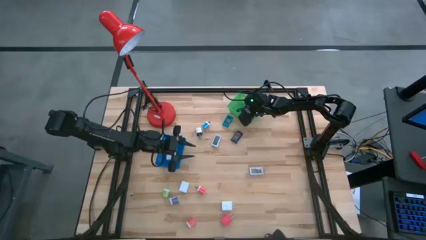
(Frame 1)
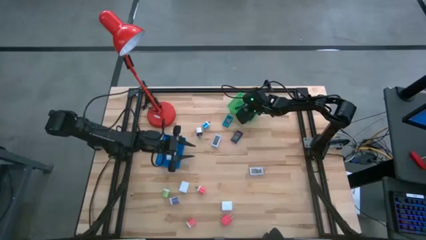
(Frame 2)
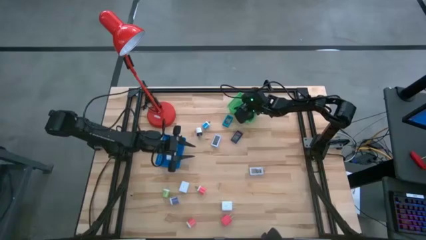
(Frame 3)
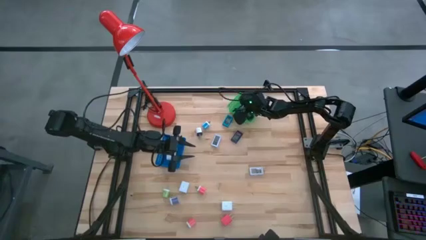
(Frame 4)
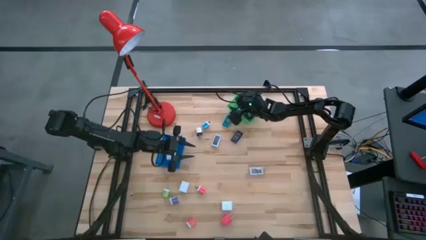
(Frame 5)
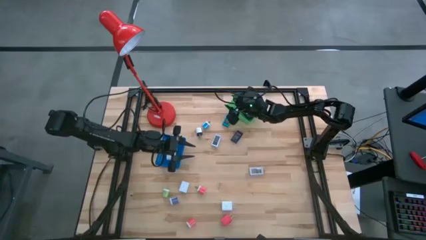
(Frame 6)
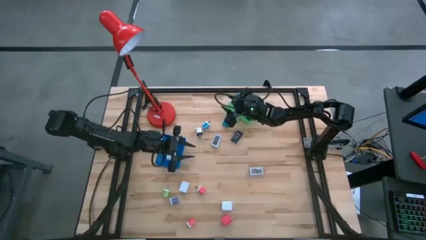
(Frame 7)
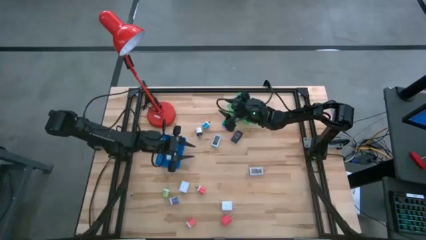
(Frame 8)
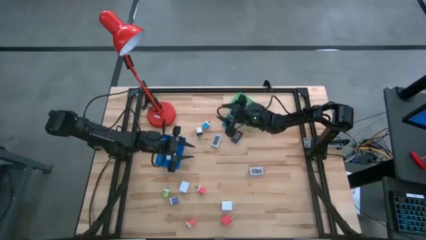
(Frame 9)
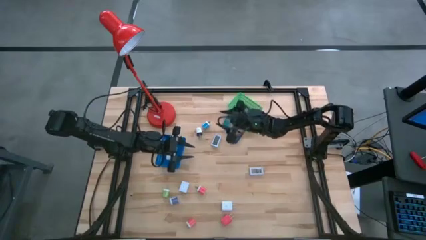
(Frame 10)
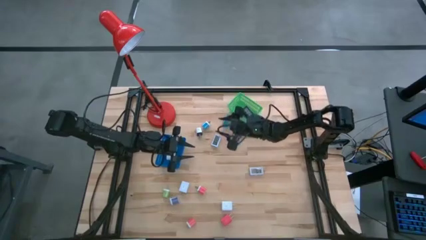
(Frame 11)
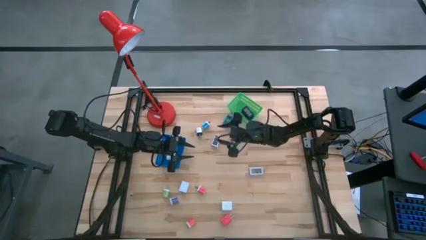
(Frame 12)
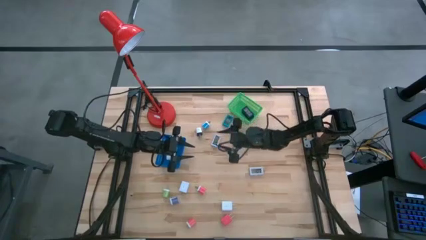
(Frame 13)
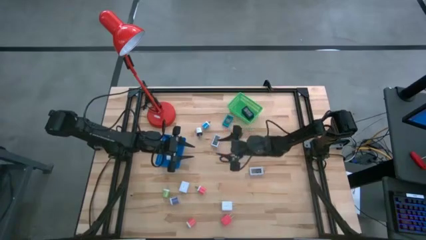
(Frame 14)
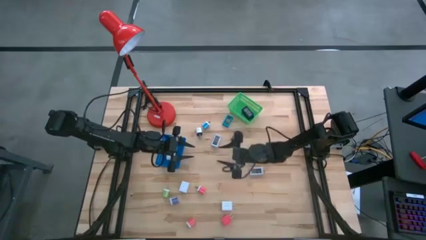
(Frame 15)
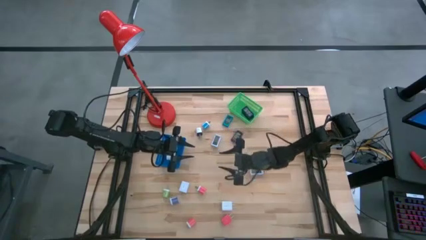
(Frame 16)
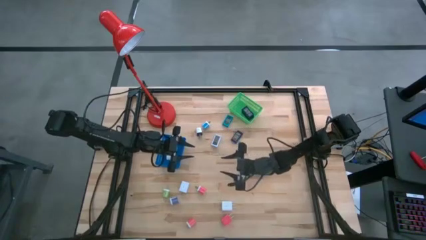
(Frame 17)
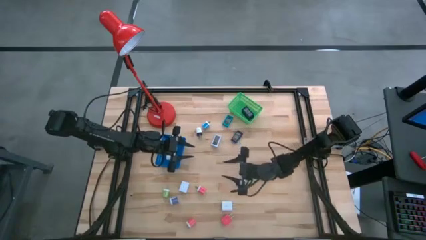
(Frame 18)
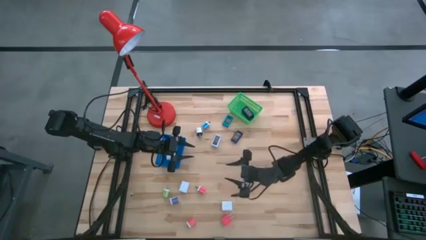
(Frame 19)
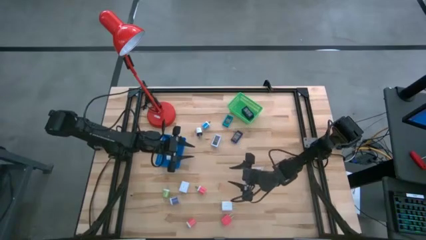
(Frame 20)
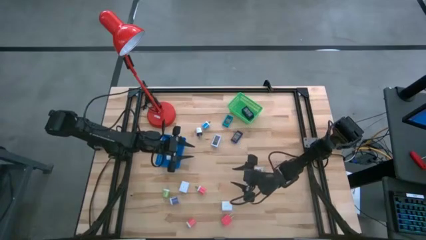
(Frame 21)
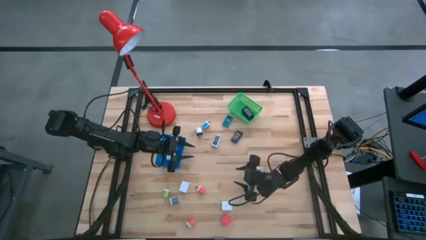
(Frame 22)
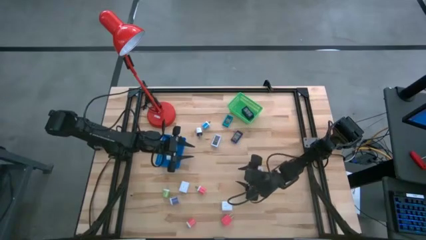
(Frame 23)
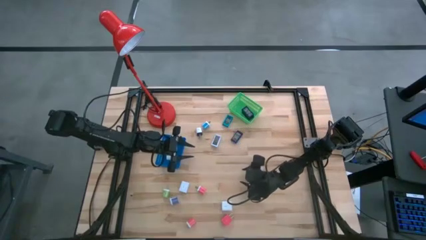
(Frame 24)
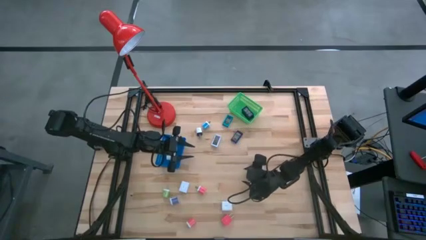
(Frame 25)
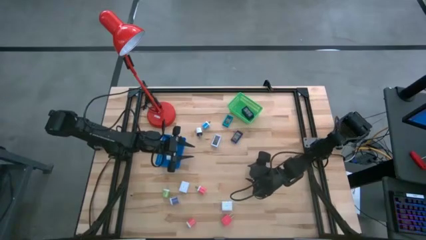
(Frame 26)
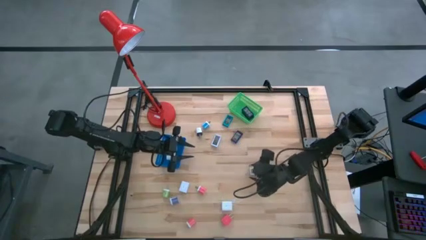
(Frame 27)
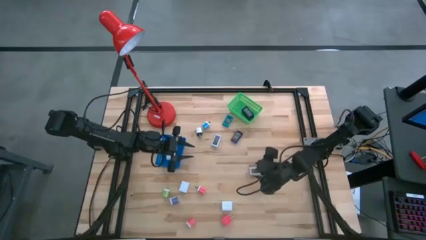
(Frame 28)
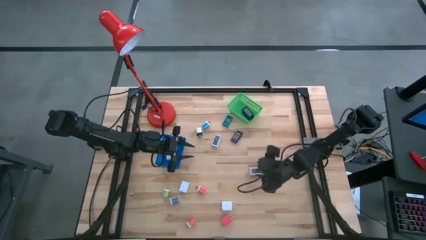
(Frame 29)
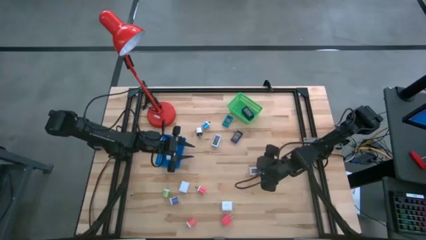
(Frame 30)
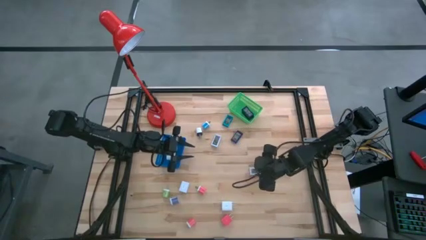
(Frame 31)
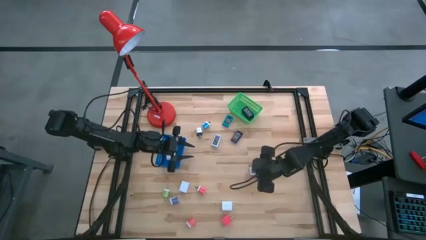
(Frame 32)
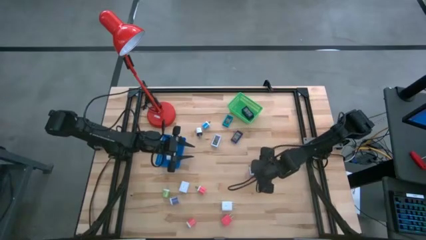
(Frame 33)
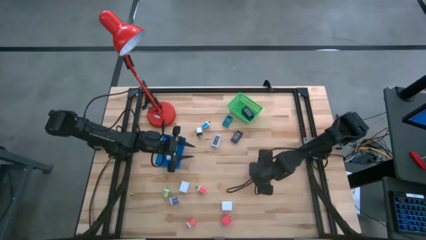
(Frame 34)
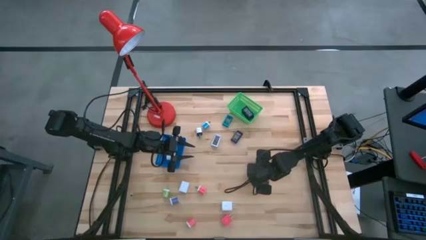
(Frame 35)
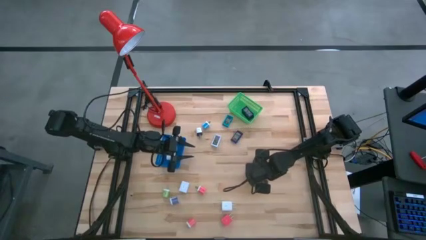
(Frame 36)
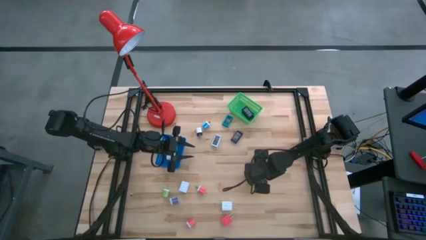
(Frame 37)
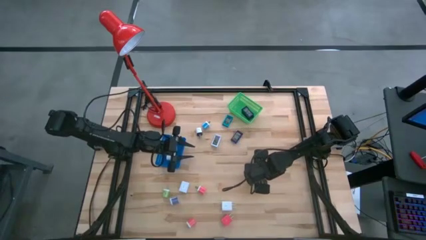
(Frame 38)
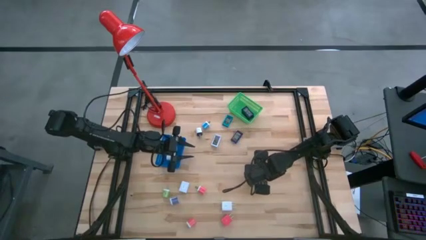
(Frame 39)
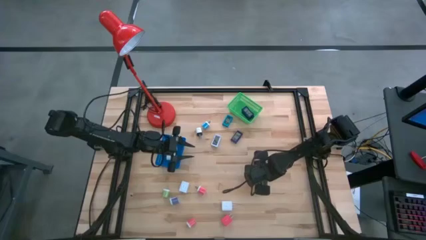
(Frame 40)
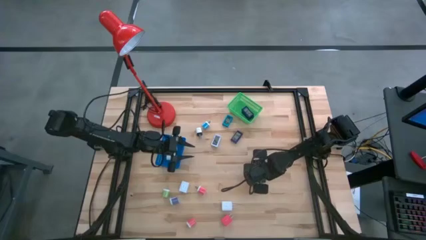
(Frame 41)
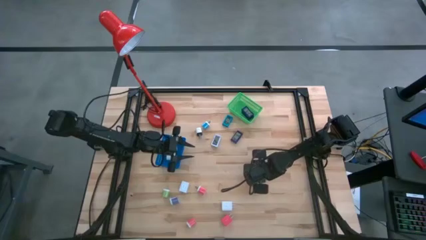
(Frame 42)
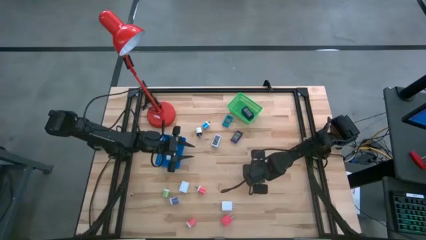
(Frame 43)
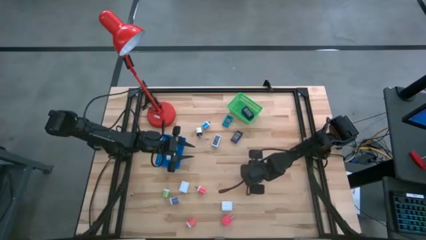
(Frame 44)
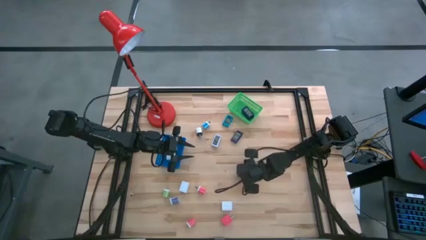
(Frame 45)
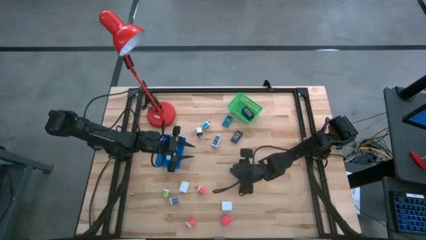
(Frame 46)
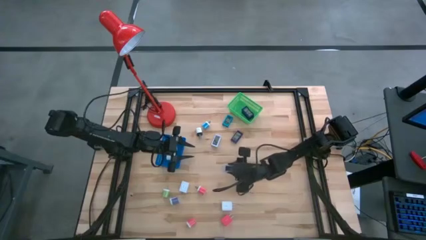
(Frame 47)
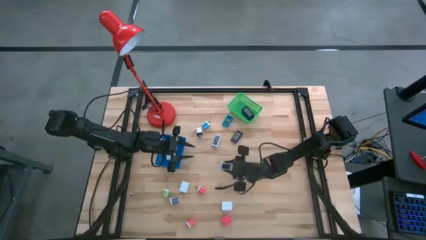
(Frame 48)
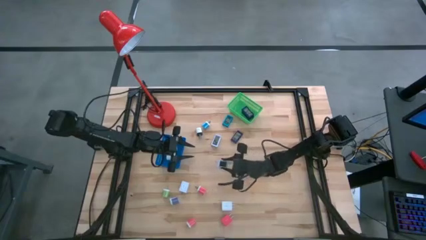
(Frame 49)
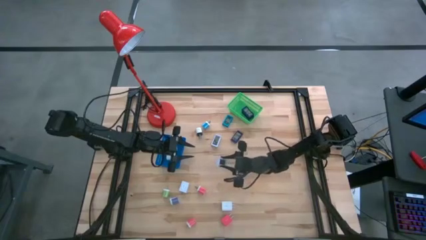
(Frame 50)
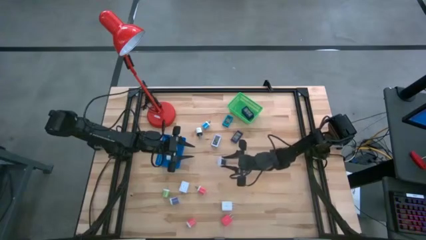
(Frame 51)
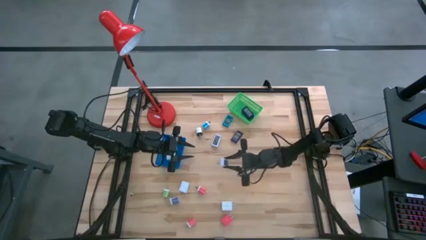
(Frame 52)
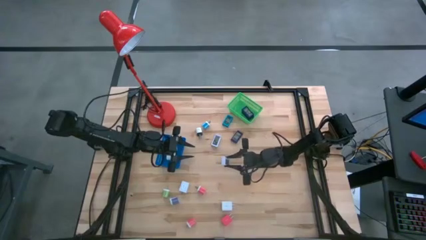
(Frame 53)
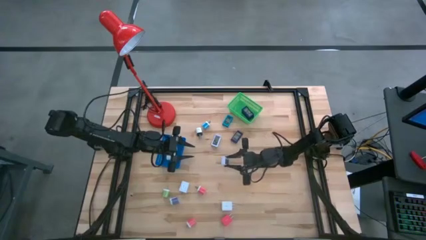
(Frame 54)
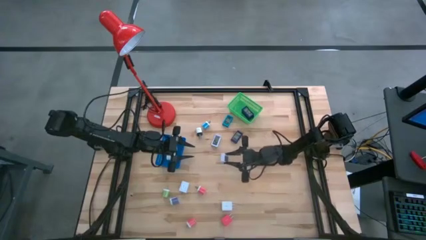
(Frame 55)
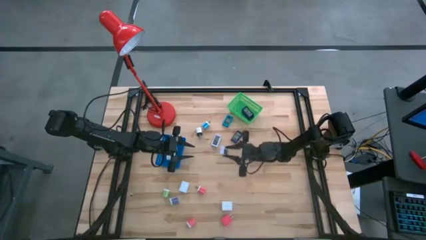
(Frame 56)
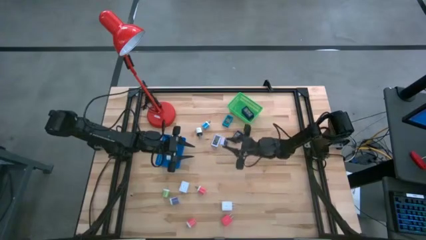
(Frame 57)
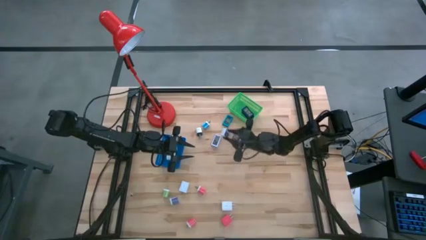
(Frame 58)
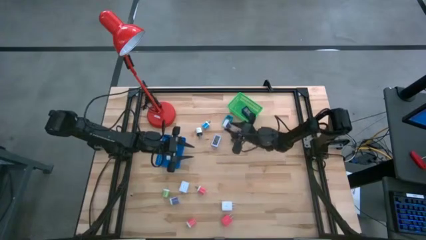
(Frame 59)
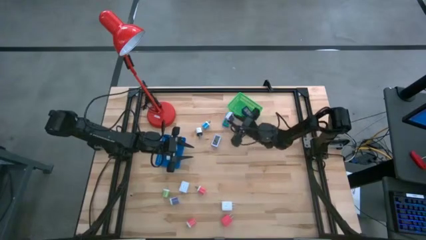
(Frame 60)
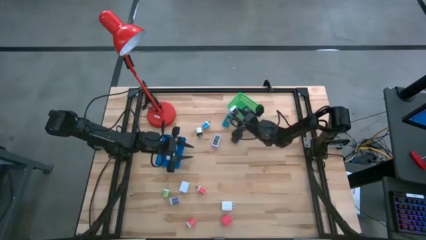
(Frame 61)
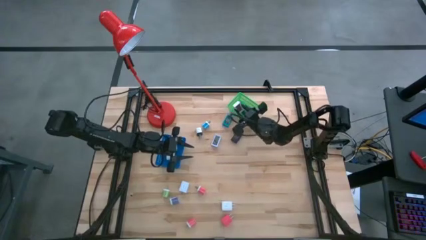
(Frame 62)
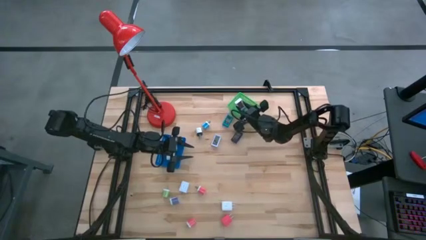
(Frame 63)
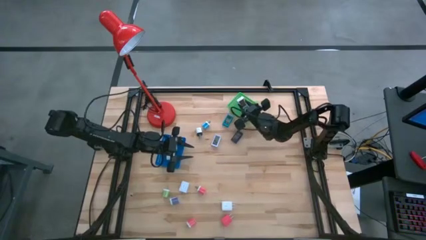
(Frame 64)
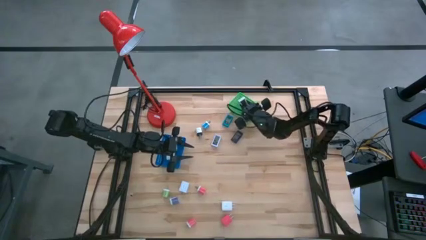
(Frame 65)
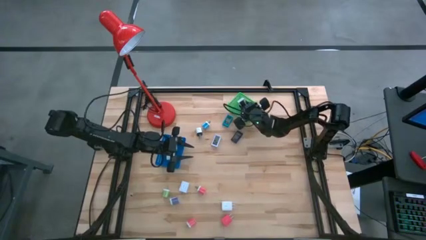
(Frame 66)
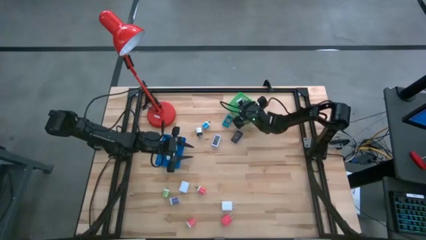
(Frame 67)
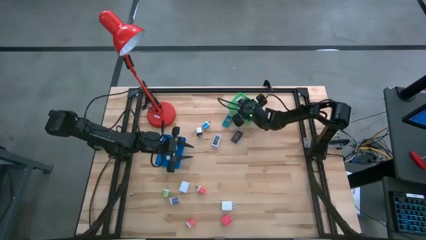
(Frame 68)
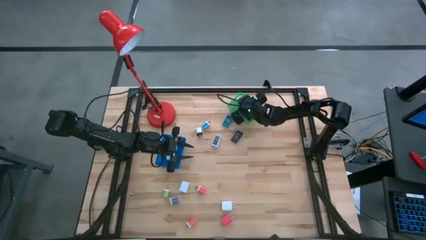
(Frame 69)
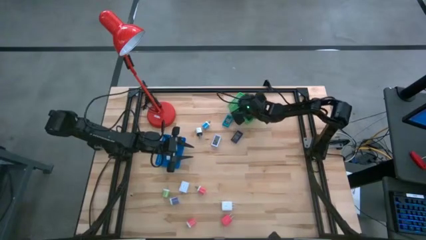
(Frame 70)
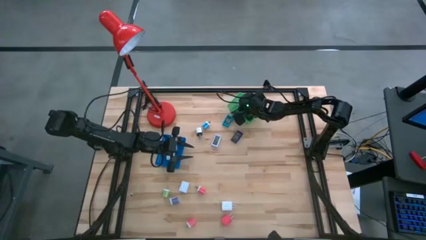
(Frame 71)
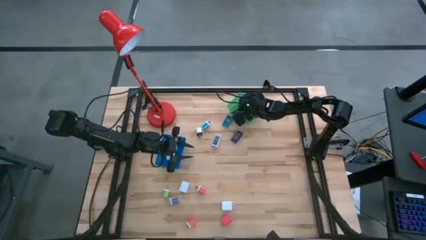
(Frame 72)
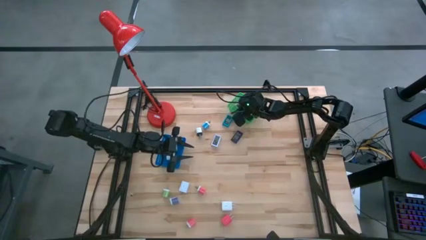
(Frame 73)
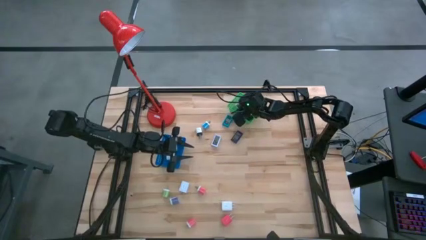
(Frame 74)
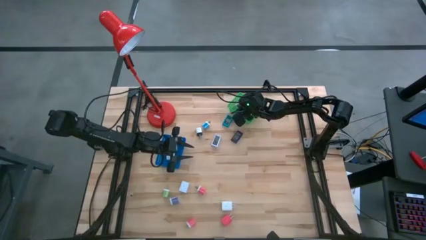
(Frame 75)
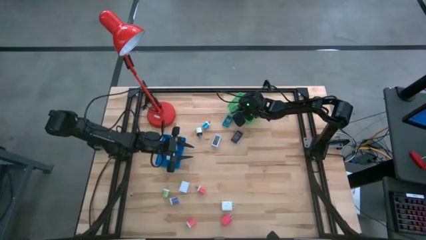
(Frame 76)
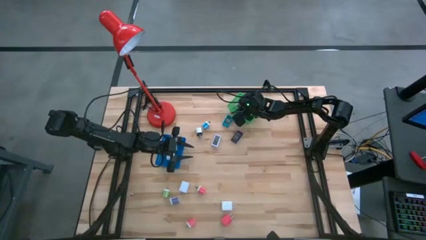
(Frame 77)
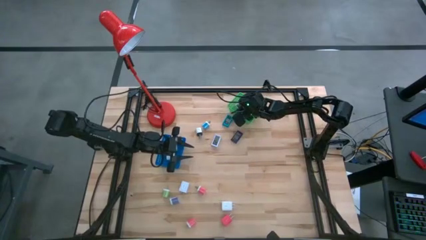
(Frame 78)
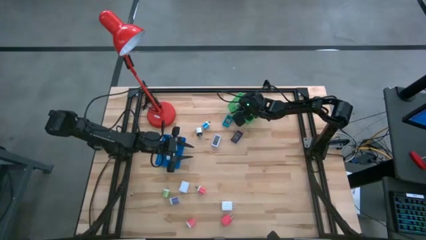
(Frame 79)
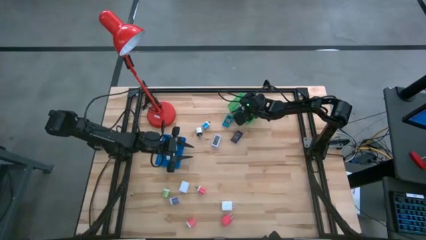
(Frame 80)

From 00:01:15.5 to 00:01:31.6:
Task: Pick & Place Office items
Put the bottom white digital clock into the green basket
